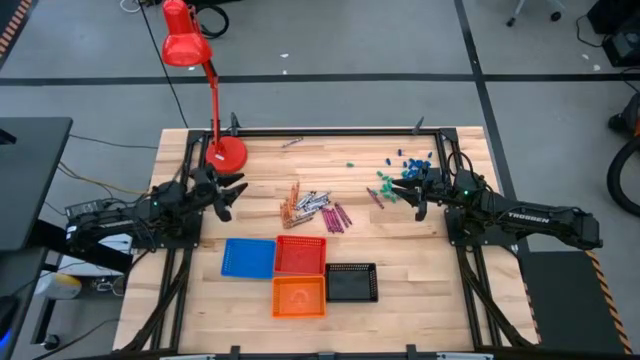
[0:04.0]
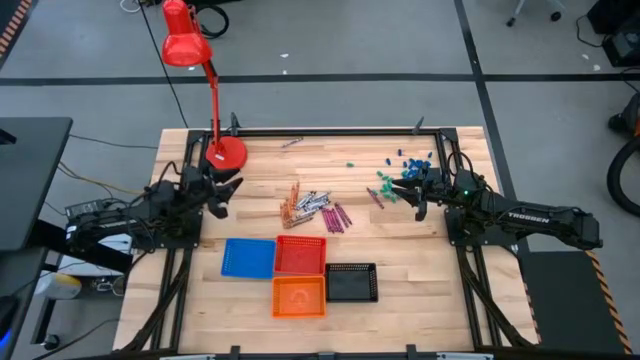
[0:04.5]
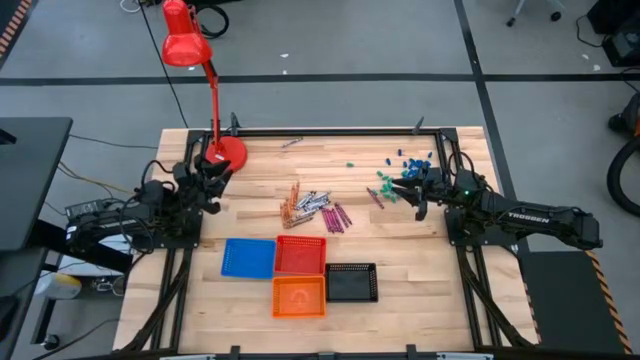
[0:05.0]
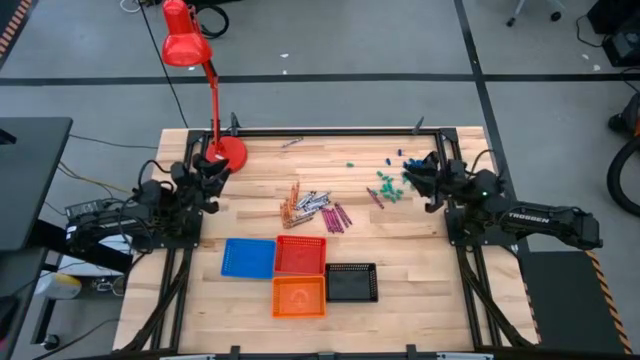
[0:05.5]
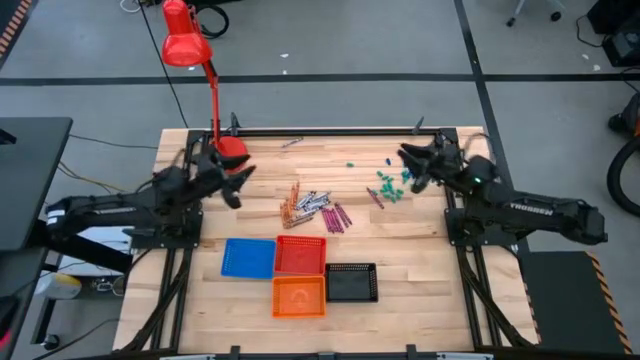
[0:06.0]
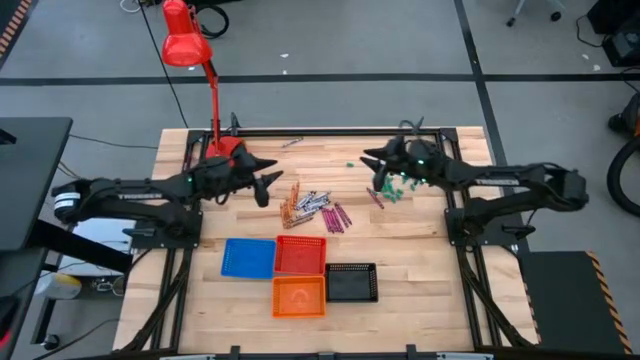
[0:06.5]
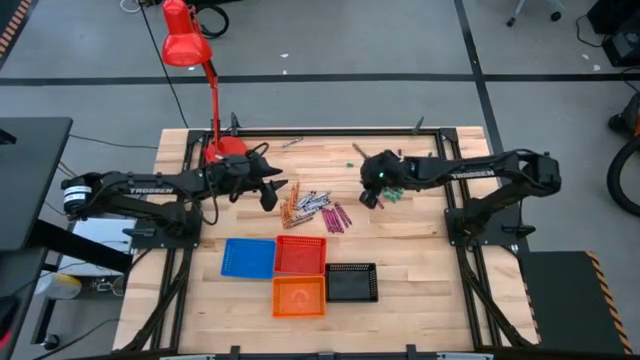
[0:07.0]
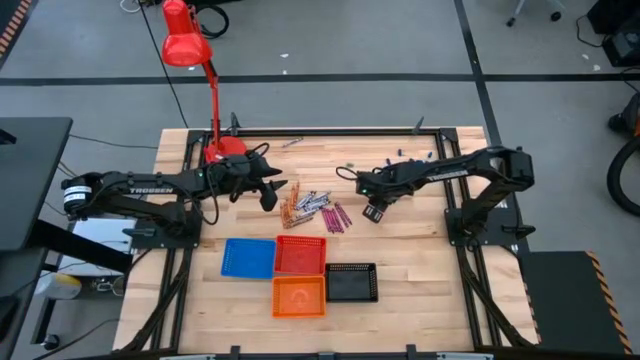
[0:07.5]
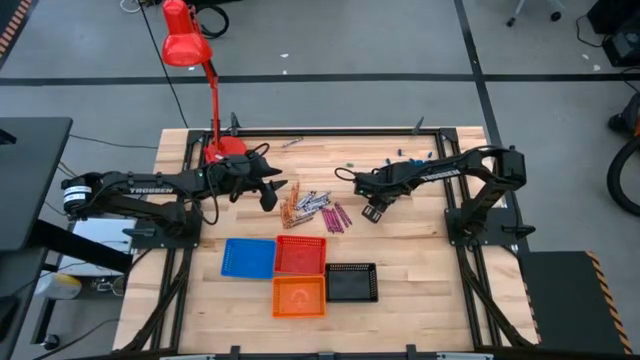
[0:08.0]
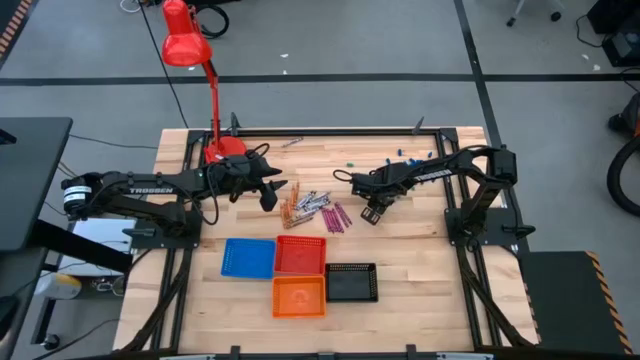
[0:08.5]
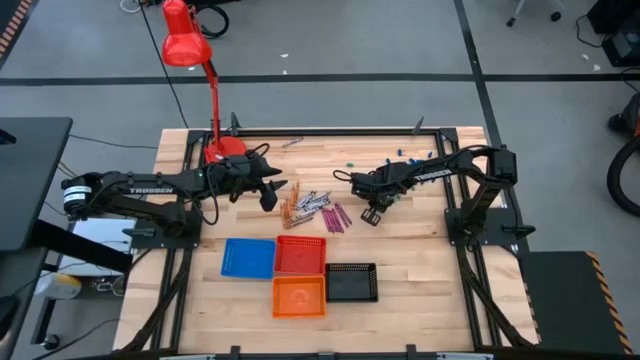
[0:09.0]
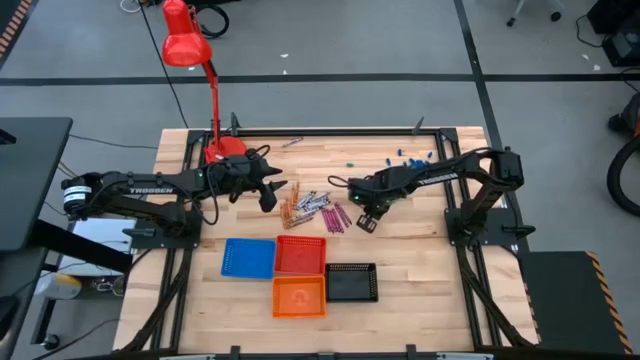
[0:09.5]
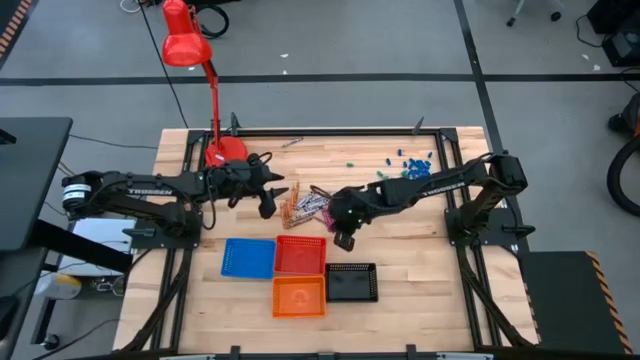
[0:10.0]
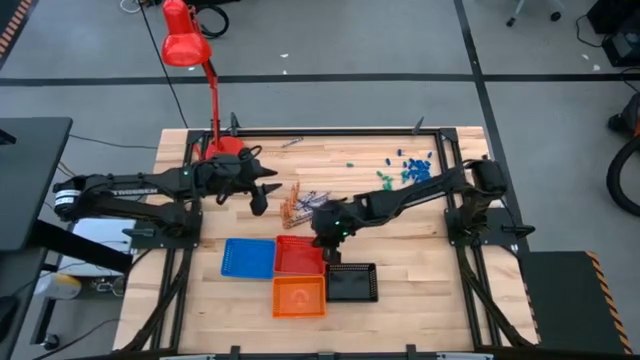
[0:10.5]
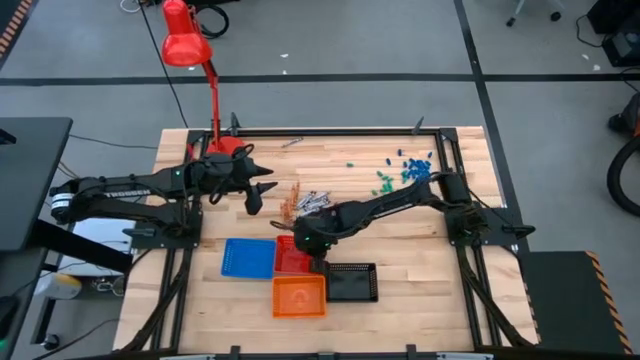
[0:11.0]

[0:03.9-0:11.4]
Task: Sort crayons
Put the violet crayon into the red bin

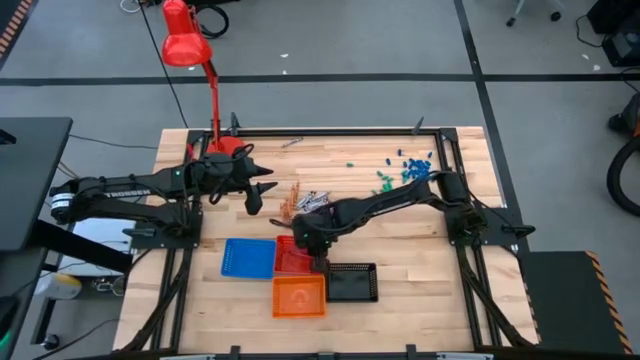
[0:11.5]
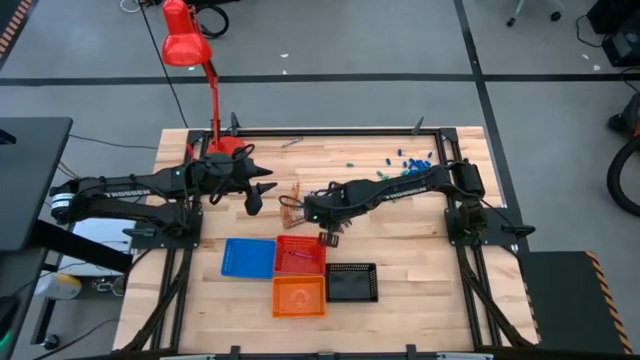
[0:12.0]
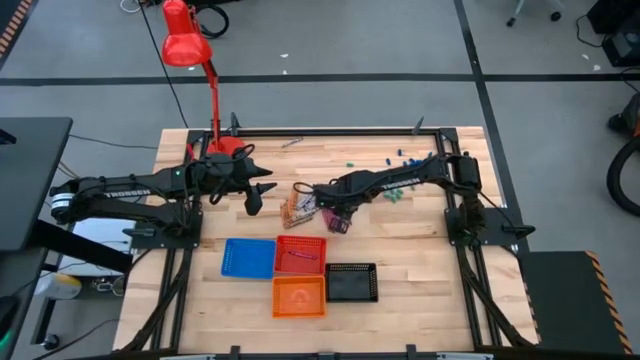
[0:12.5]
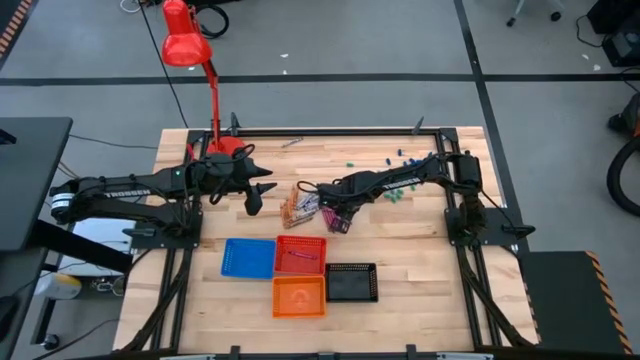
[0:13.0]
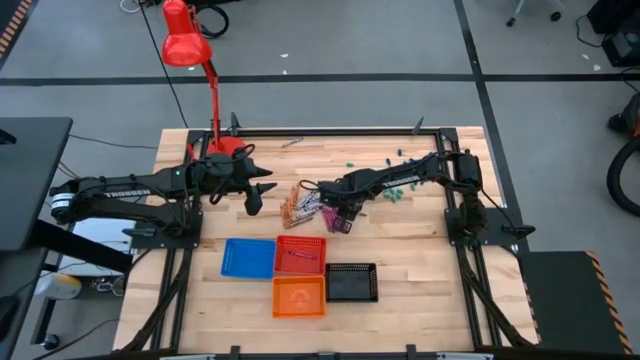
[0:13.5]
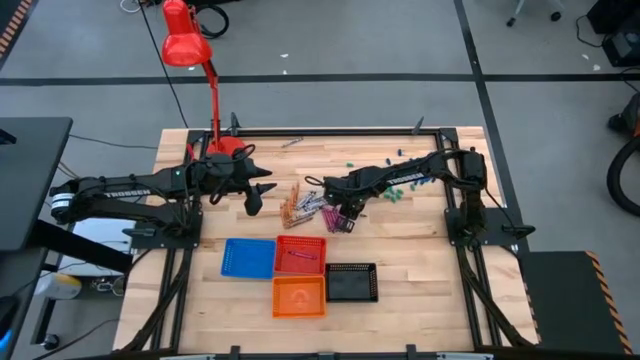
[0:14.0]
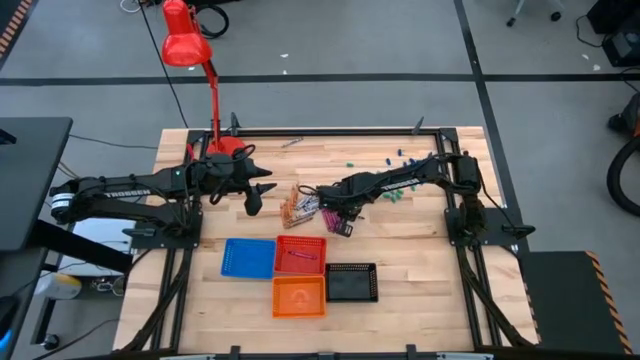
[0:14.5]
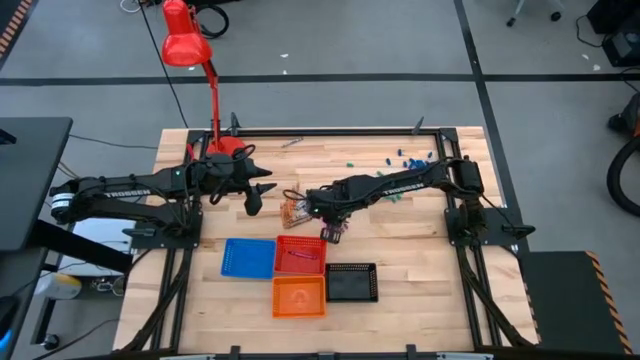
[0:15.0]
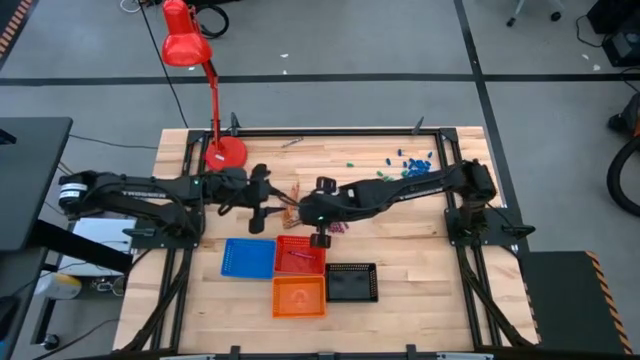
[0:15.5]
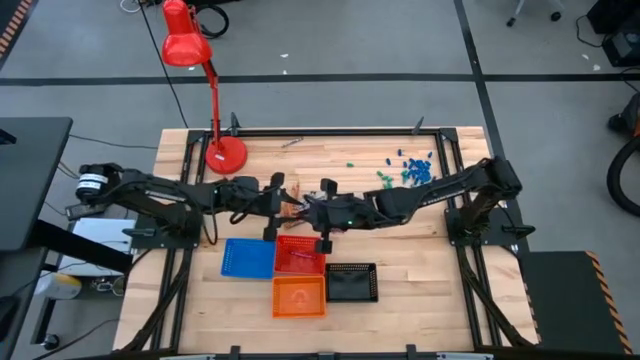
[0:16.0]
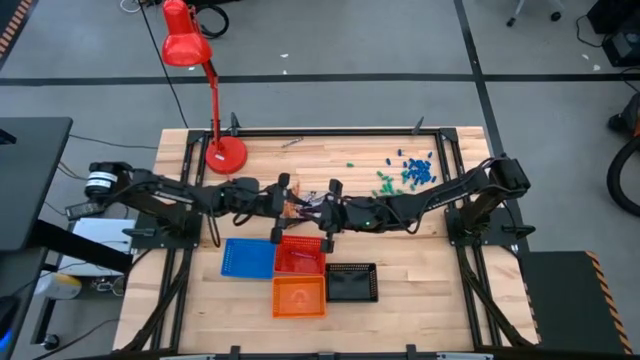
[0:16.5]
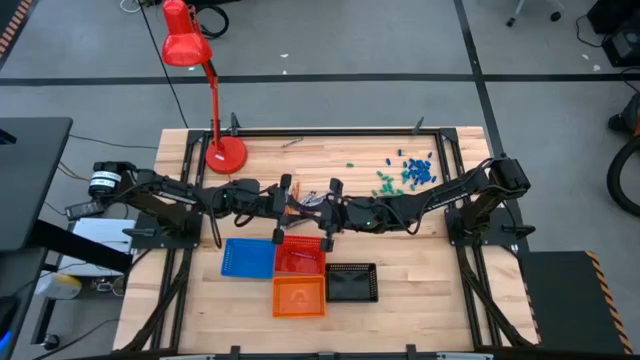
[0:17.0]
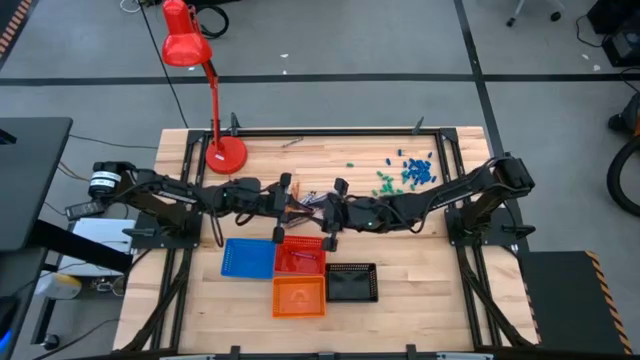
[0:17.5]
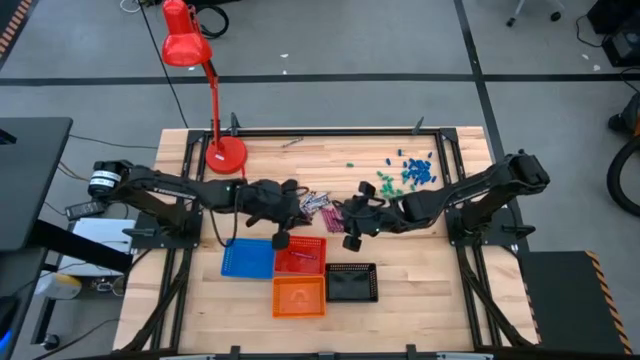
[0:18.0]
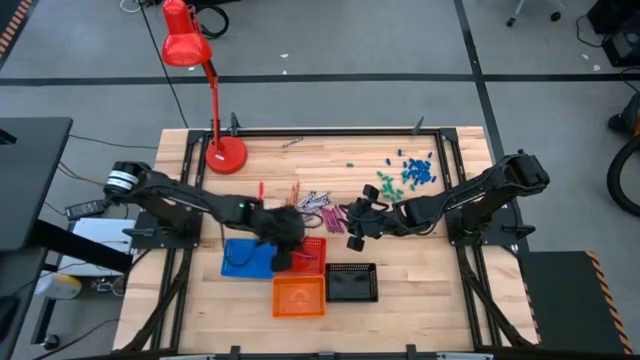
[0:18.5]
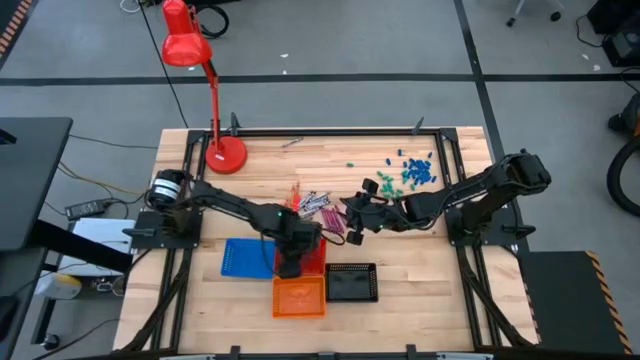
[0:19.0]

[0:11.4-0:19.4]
Put the violet crayon into the red bin

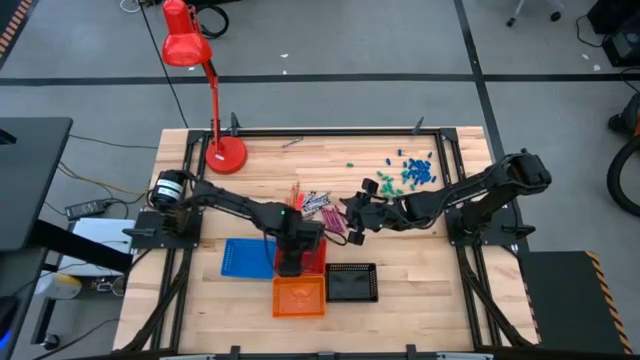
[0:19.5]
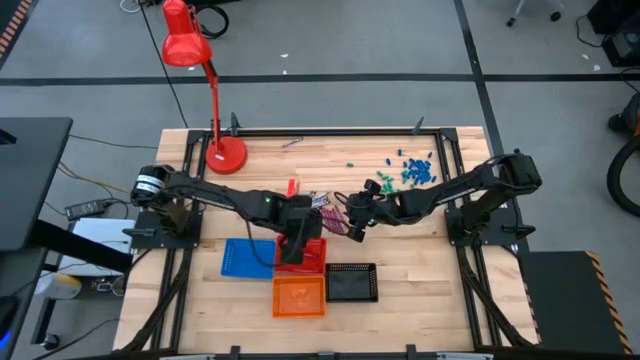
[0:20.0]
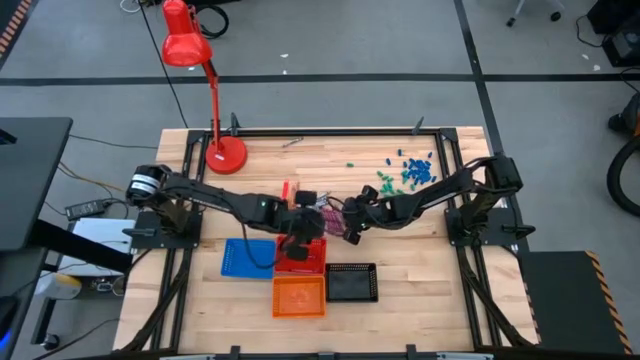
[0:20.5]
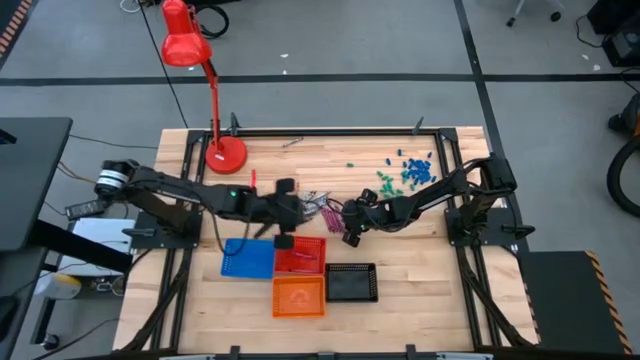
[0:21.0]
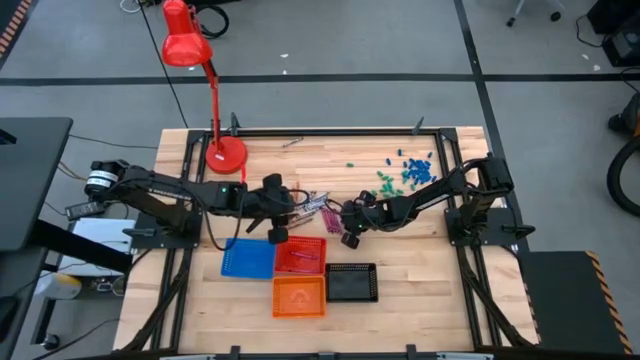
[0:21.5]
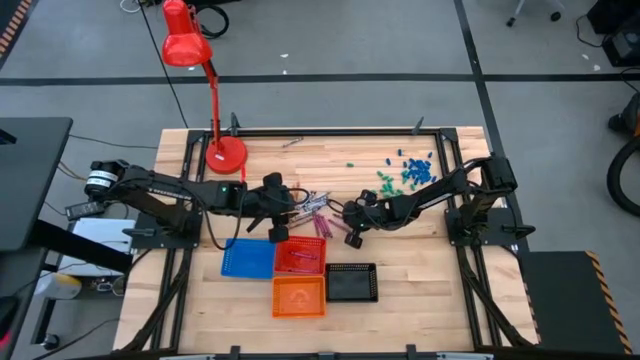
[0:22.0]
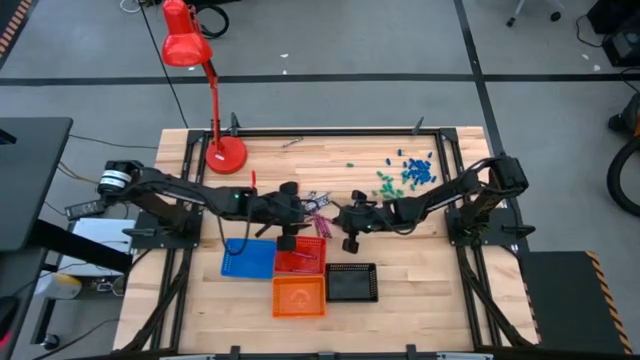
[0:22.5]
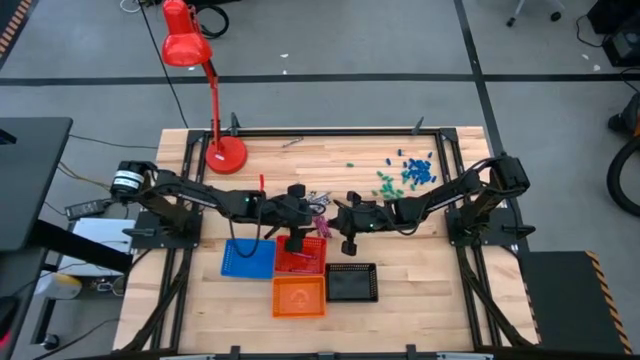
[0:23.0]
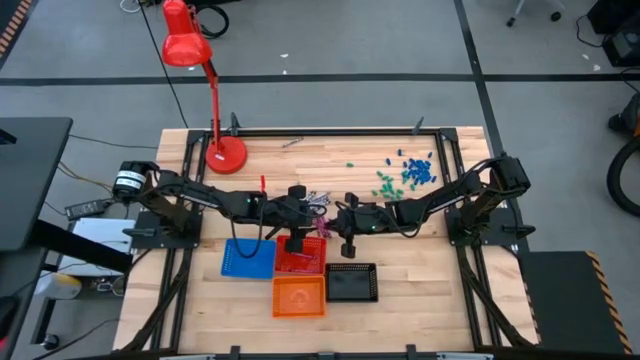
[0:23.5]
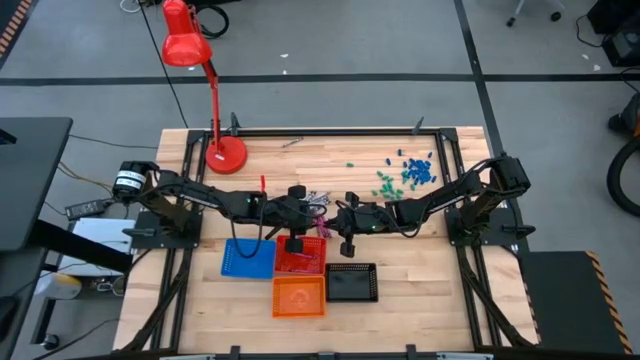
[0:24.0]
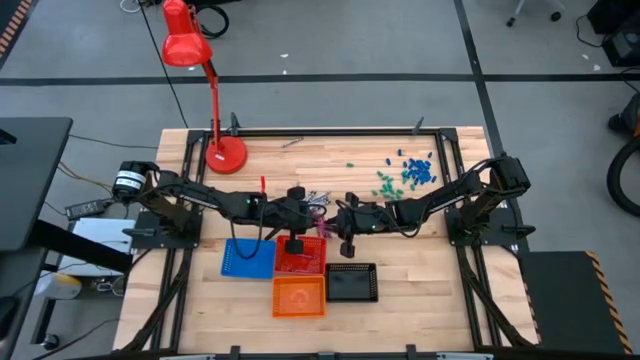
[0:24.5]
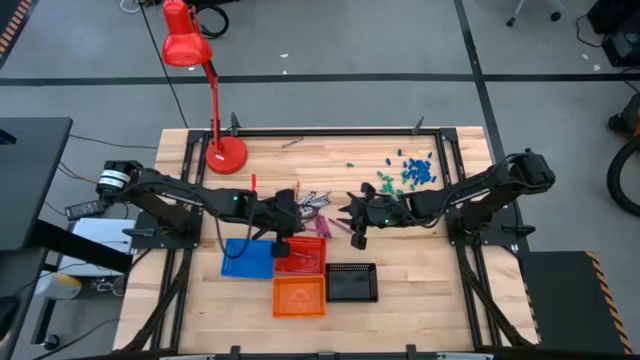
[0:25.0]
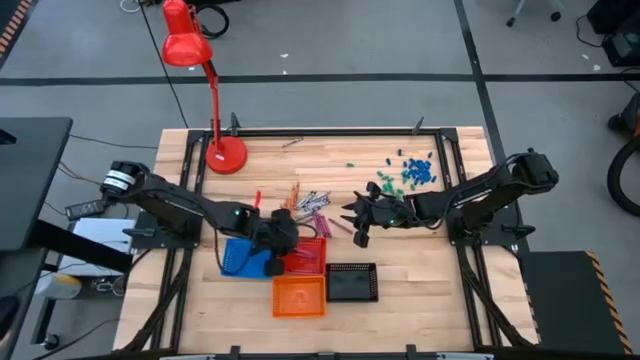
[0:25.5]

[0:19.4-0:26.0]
Put the violet crayon into the red bin
